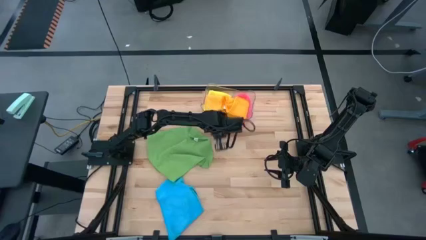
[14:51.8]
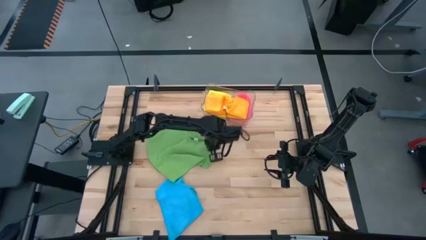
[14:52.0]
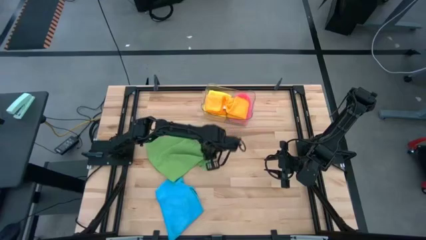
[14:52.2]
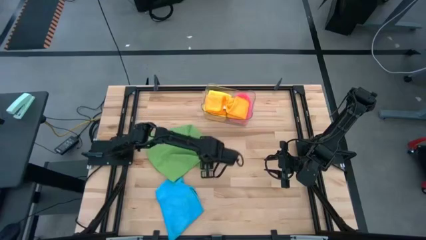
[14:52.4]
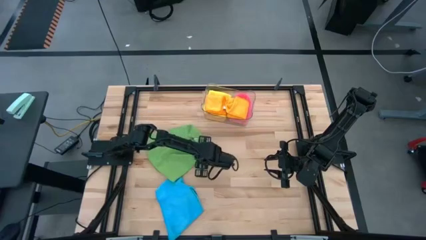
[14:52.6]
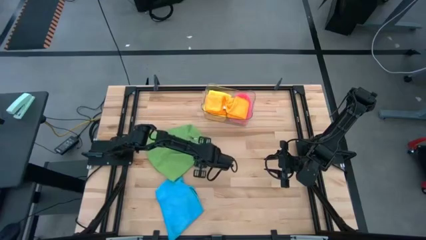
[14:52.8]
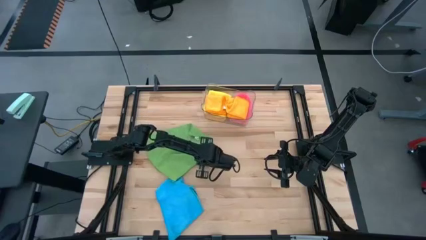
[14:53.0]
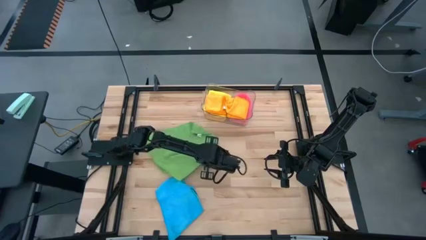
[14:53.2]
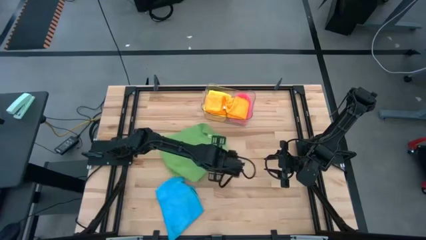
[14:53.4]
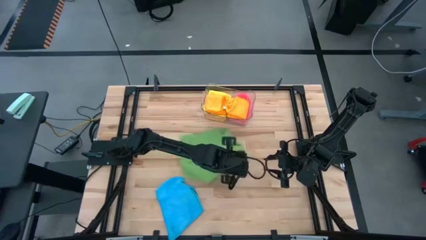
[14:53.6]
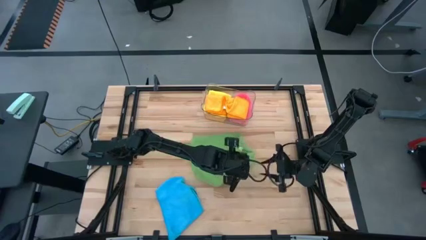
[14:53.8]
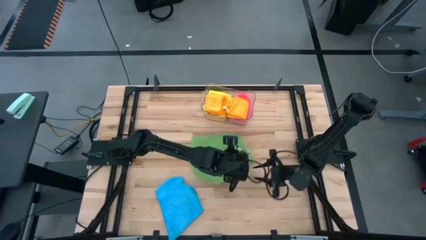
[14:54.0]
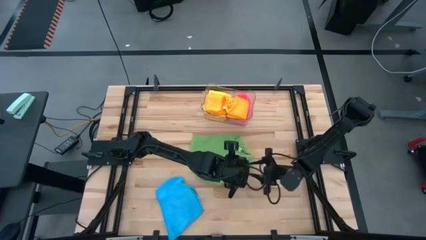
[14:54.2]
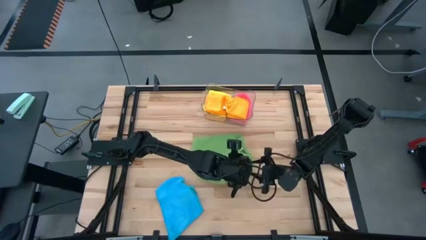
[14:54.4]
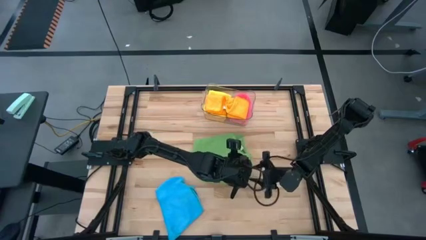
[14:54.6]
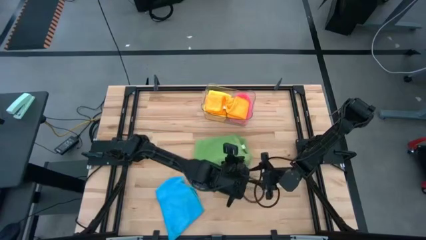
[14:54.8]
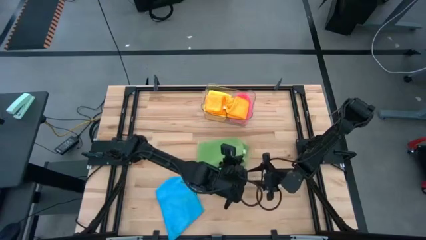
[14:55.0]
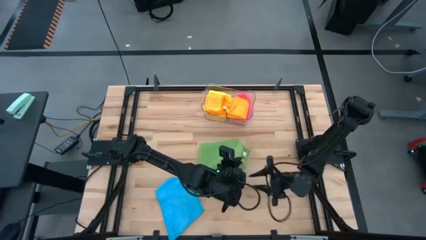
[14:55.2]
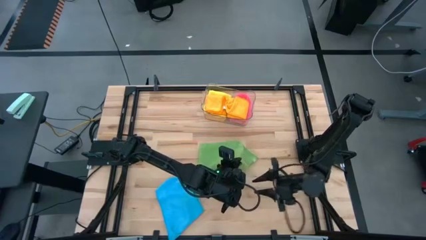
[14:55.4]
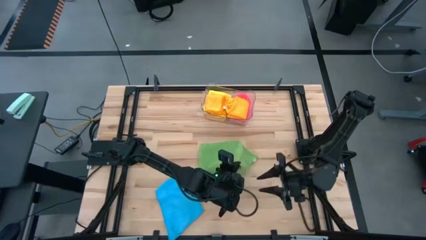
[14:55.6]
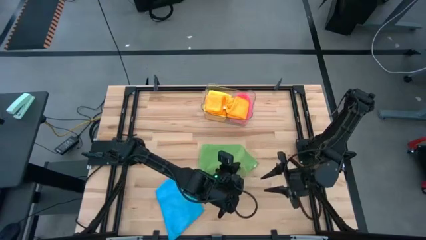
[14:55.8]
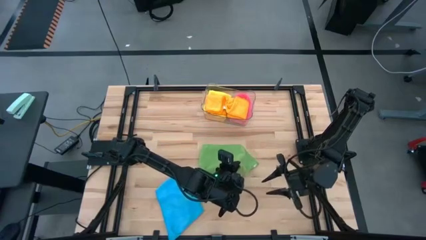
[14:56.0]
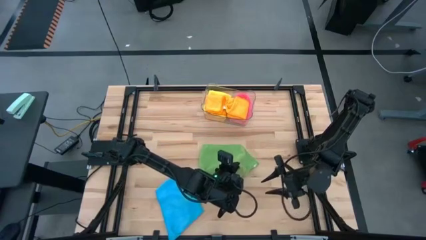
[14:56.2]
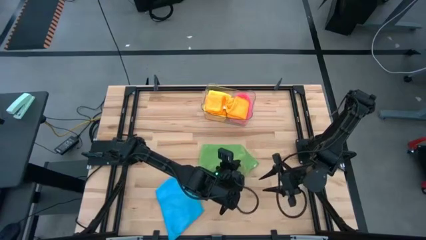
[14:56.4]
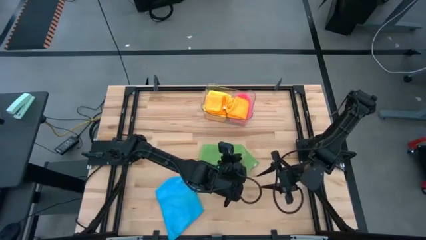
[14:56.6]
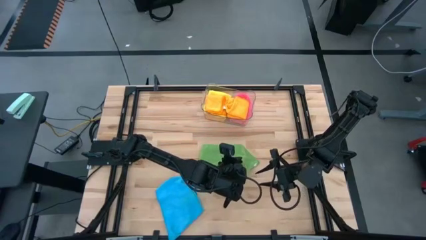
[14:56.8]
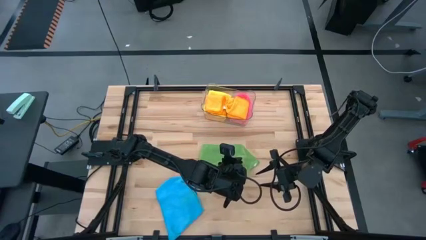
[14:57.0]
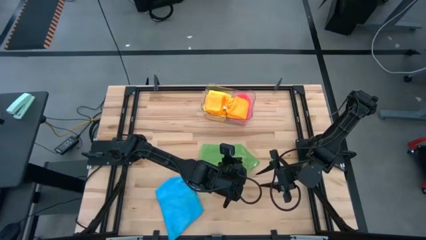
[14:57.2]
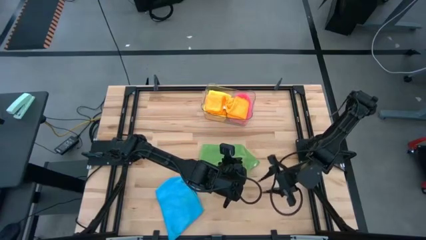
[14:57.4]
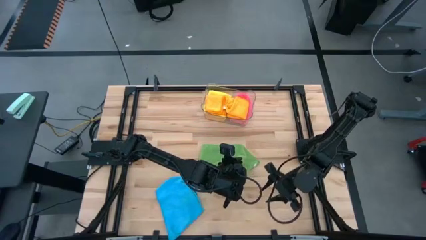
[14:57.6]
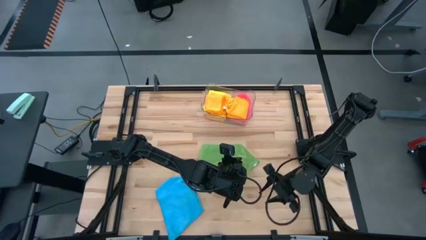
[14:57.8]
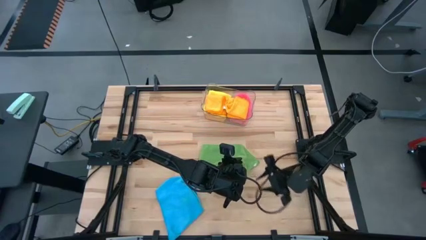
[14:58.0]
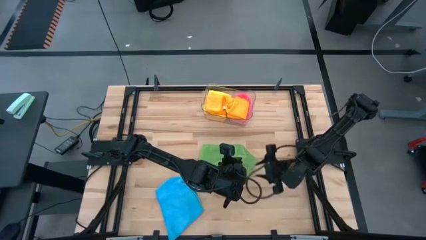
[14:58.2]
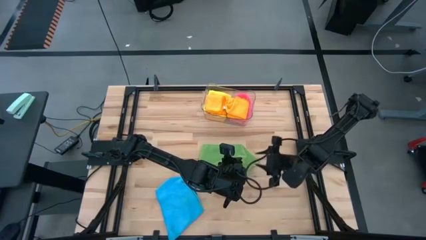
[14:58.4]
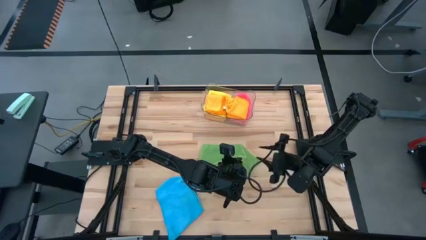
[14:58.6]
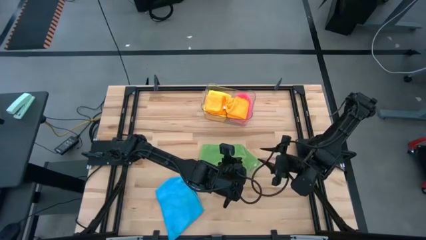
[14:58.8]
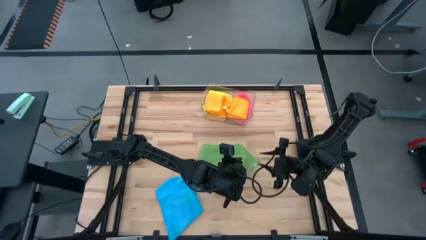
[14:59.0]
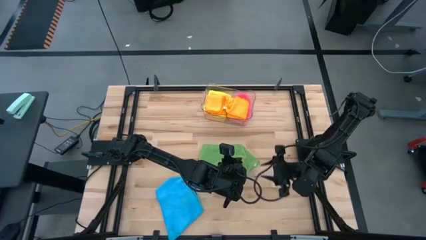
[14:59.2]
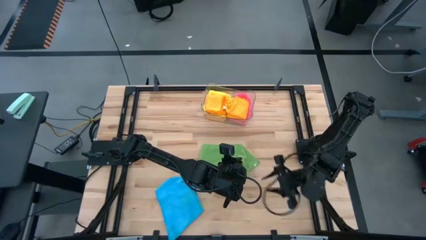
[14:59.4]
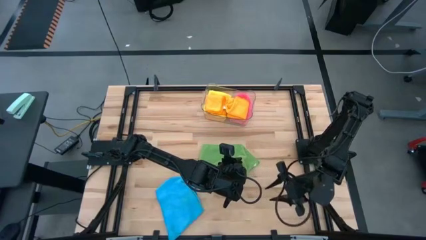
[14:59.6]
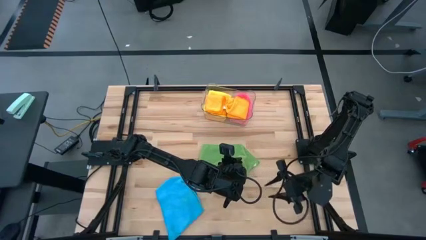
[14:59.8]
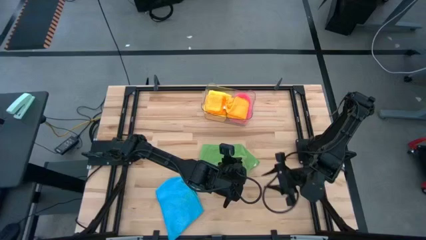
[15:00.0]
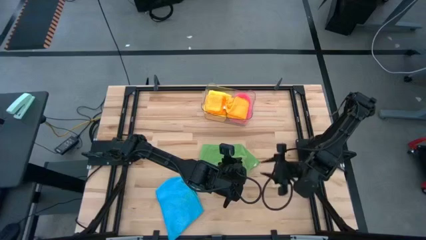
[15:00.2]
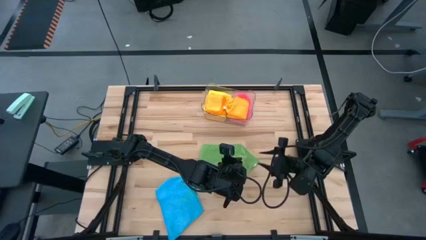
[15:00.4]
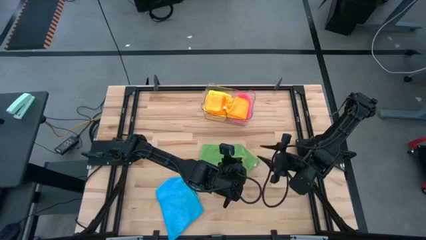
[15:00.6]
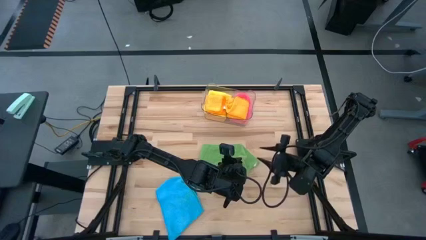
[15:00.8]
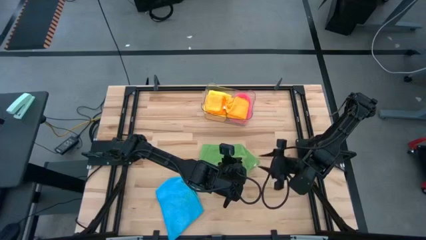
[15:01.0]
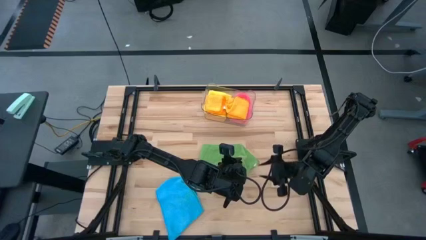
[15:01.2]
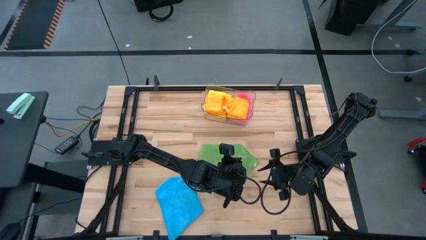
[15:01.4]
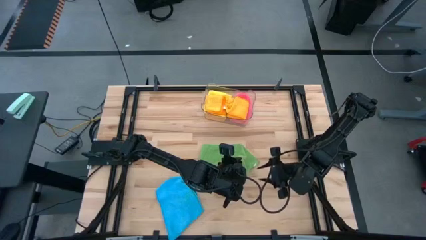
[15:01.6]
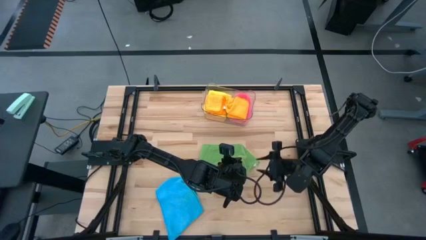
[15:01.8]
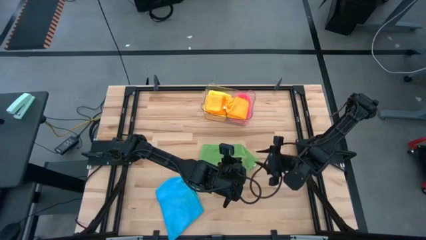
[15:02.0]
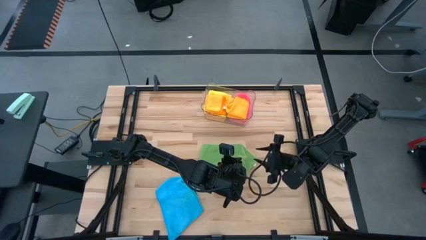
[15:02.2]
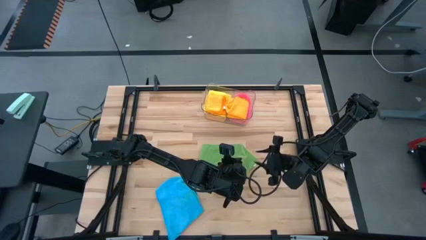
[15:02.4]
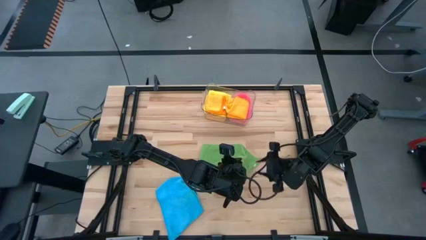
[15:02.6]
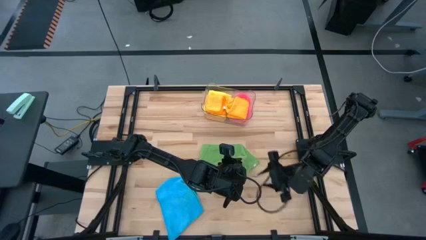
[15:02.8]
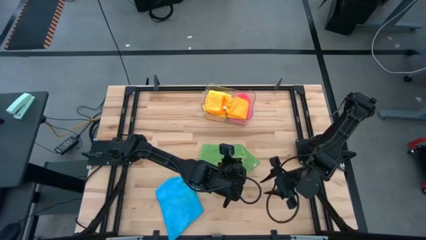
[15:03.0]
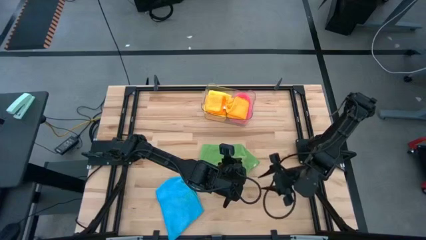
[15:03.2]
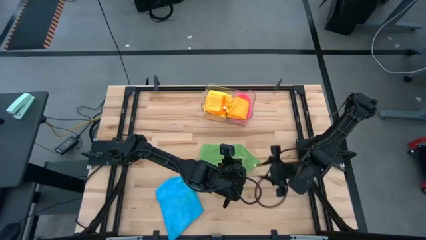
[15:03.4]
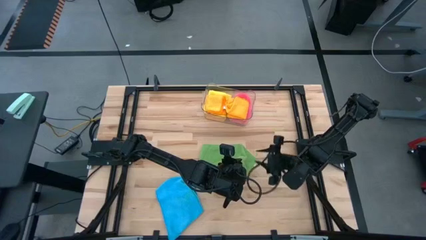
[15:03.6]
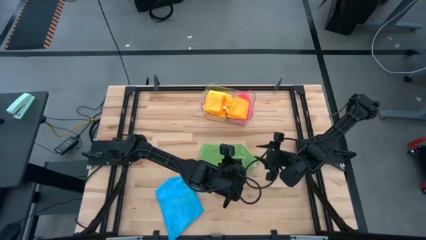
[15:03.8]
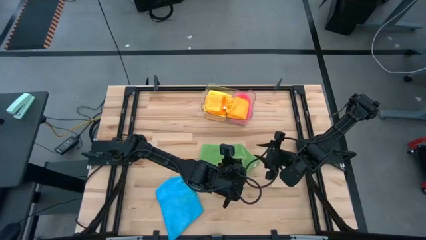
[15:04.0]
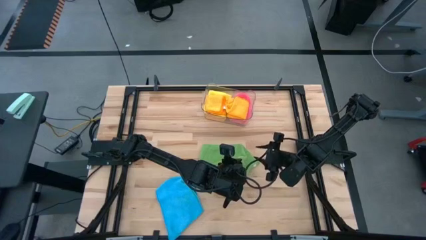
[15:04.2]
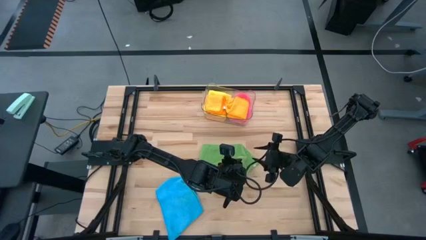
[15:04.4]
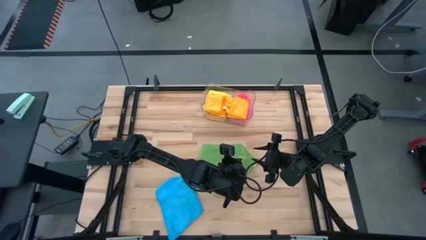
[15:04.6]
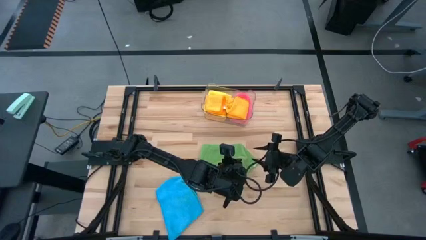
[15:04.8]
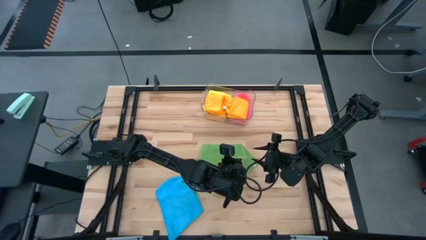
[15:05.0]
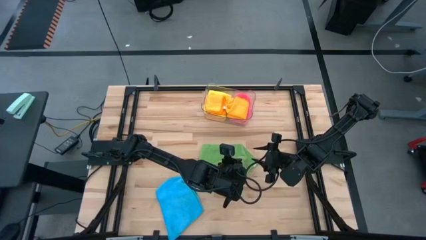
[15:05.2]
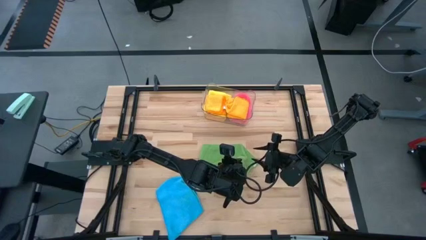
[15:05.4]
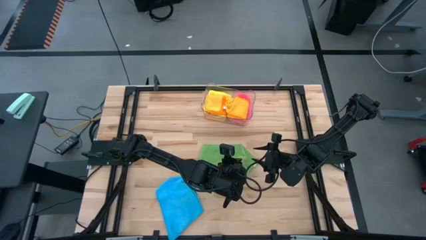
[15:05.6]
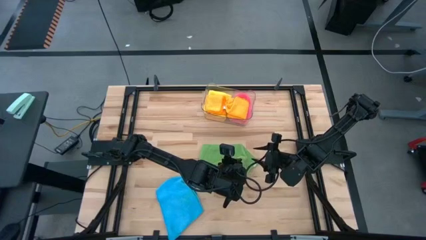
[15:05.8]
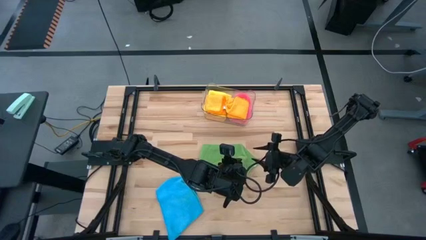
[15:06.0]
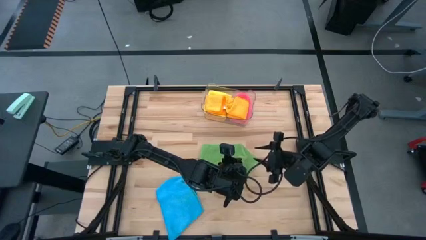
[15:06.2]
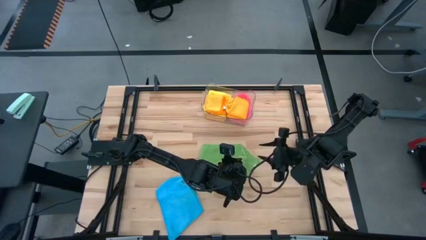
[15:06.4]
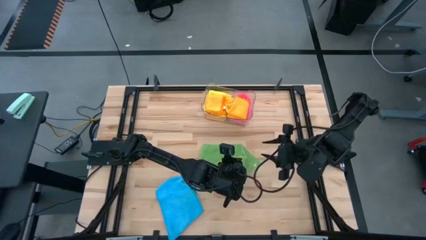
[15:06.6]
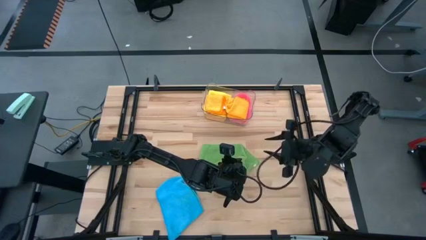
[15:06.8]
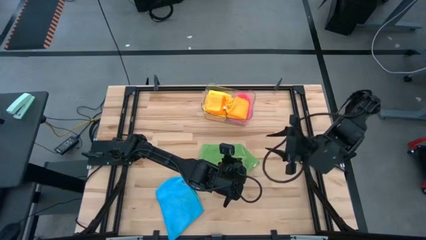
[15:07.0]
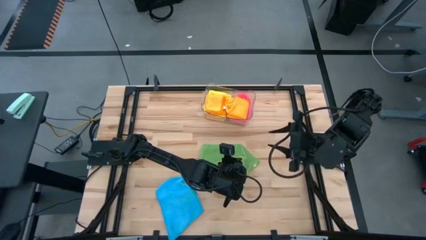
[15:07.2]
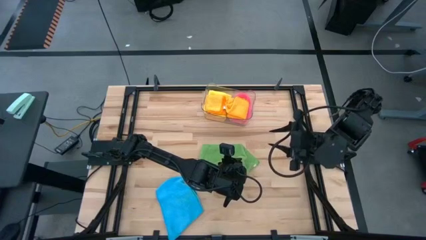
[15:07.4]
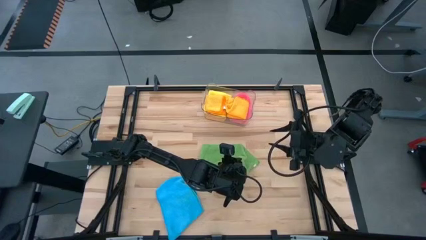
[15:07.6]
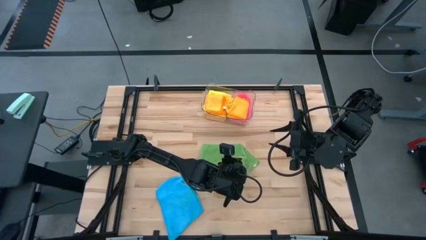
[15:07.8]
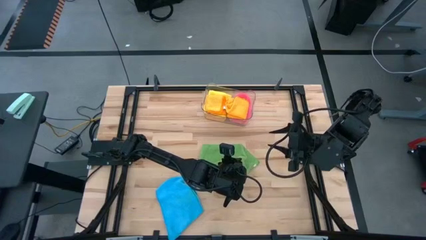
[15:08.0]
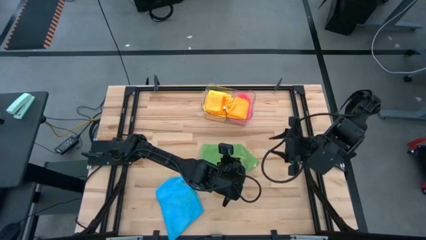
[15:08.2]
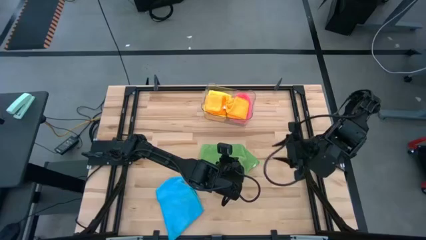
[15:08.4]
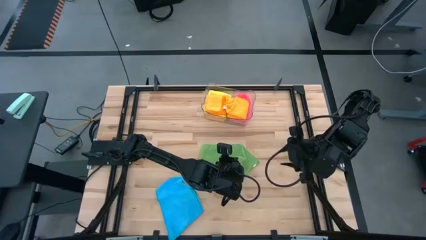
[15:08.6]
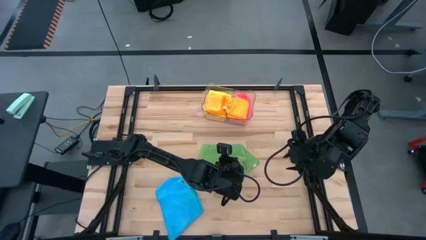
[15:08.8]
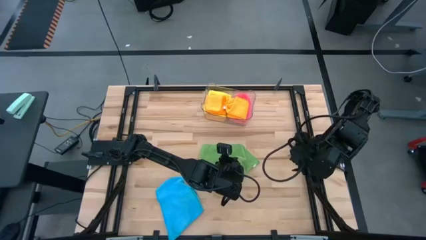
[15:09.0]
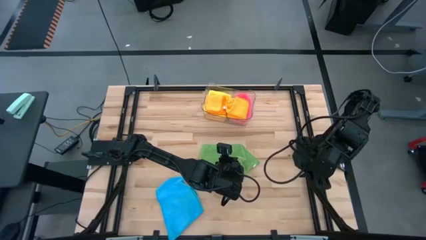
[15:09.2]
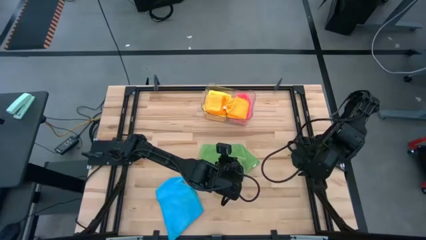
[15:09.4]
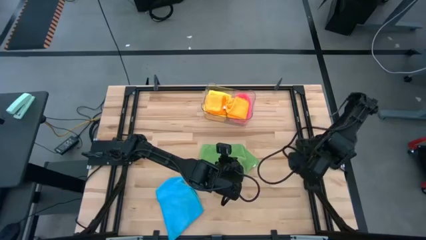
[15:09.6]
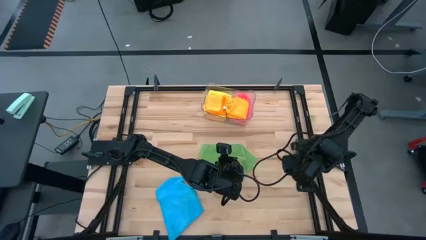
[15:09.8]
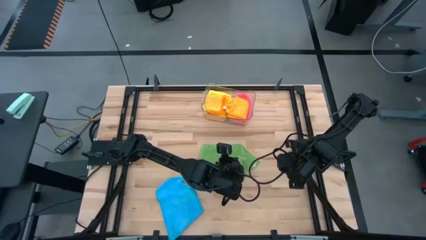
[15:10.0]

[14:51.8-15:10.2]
Task: Fold microfiber towels
Fold the green microfiber cloth
